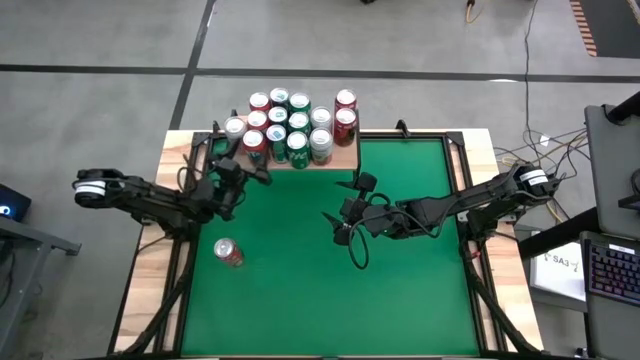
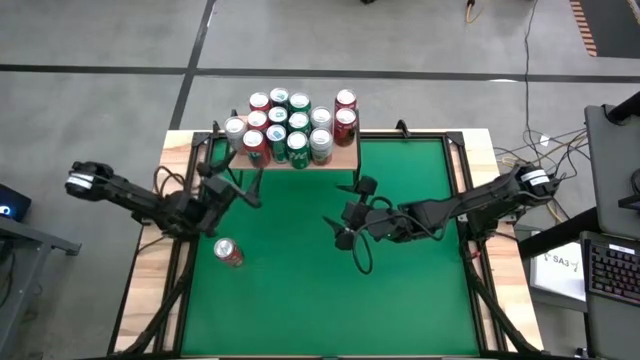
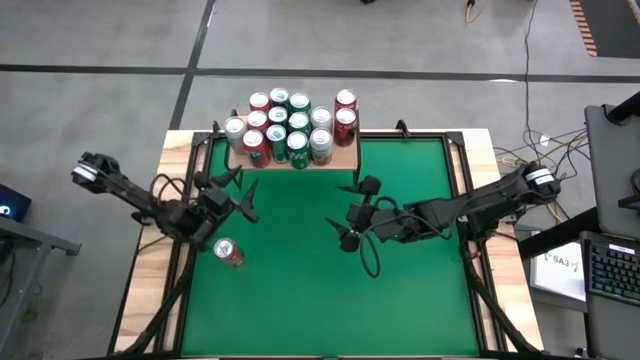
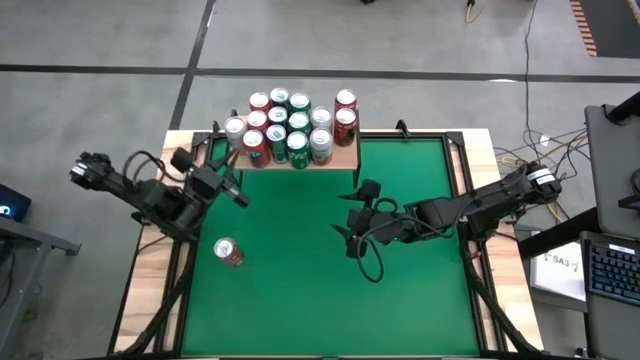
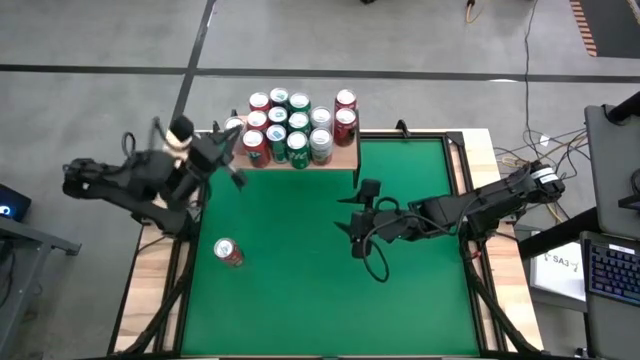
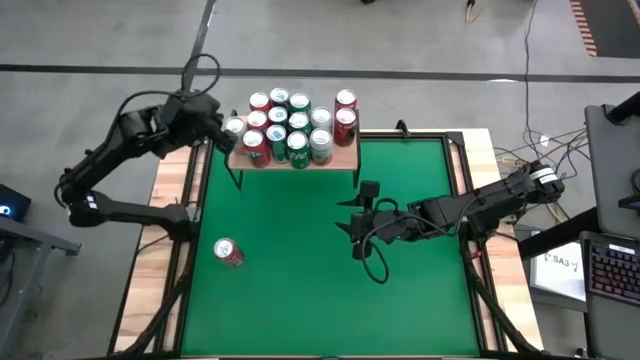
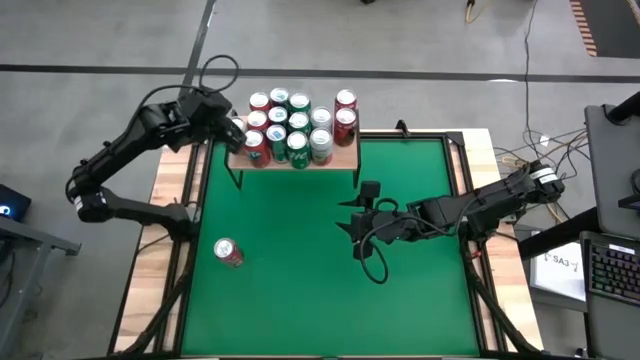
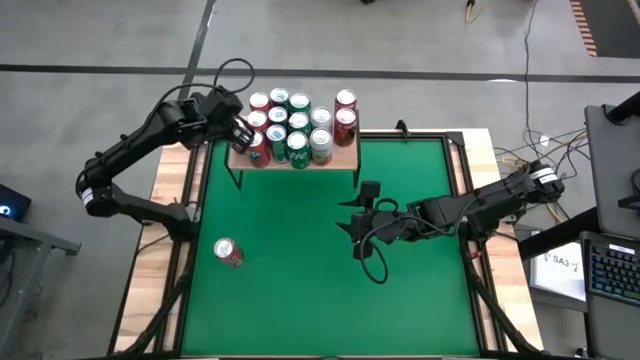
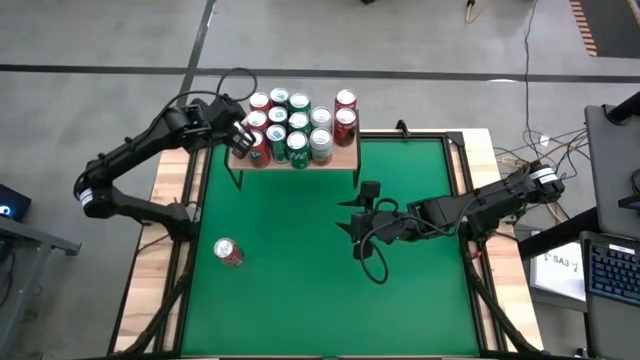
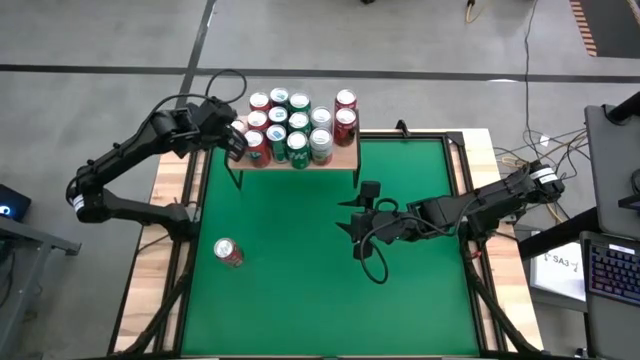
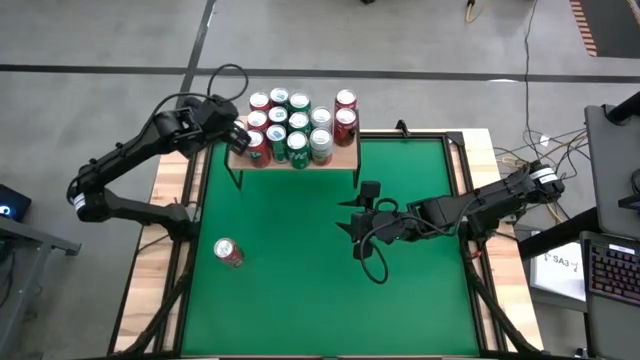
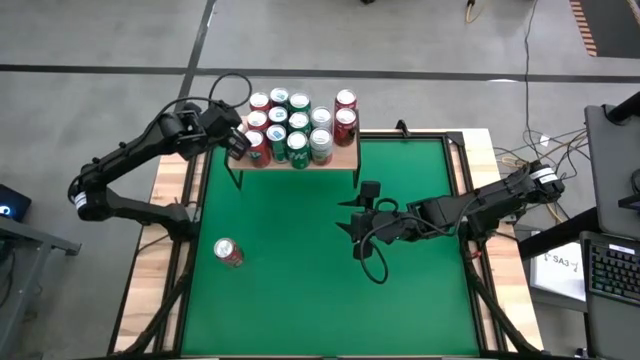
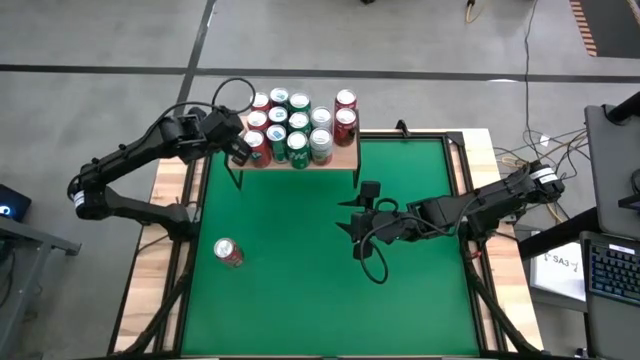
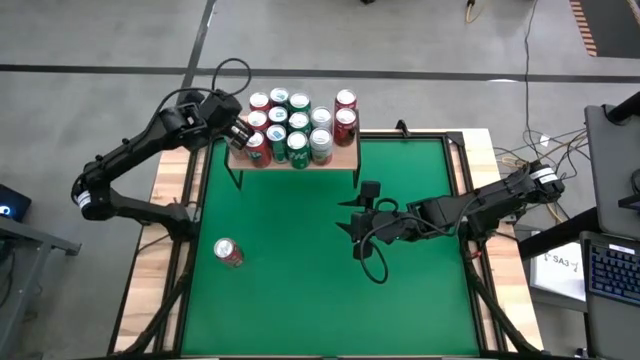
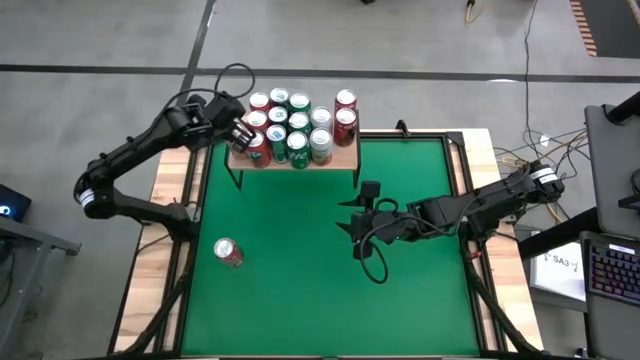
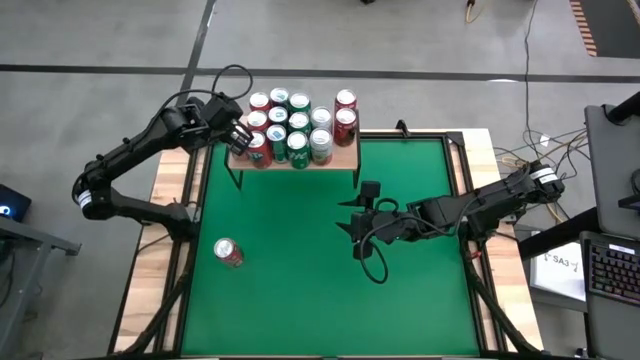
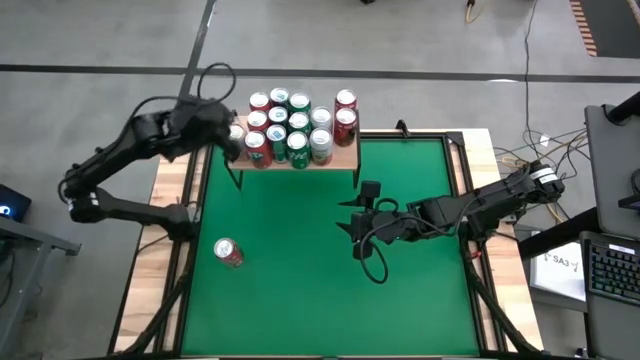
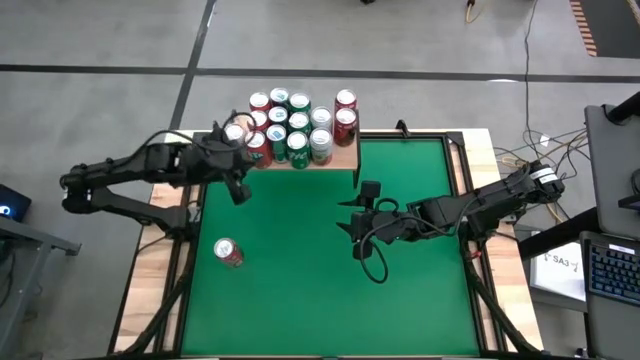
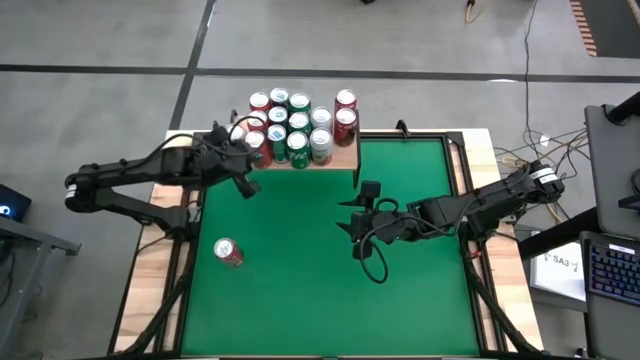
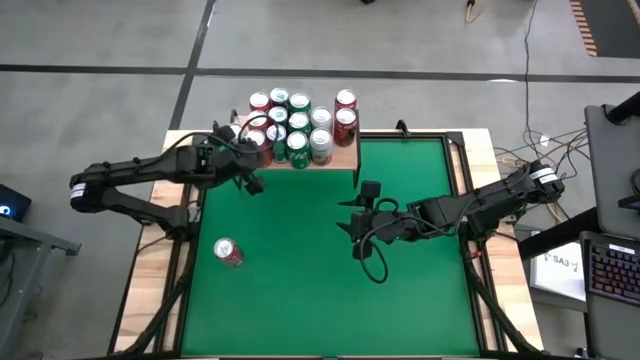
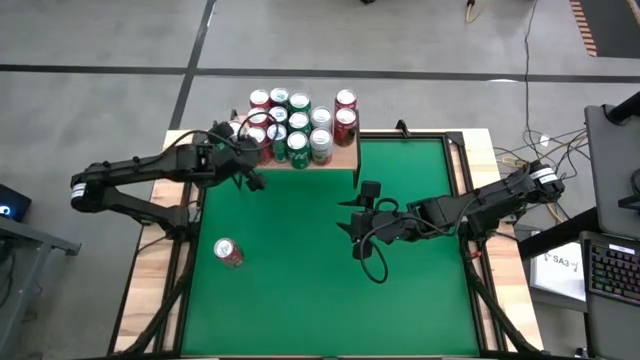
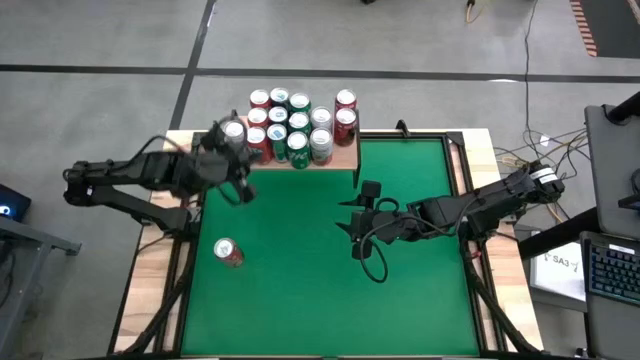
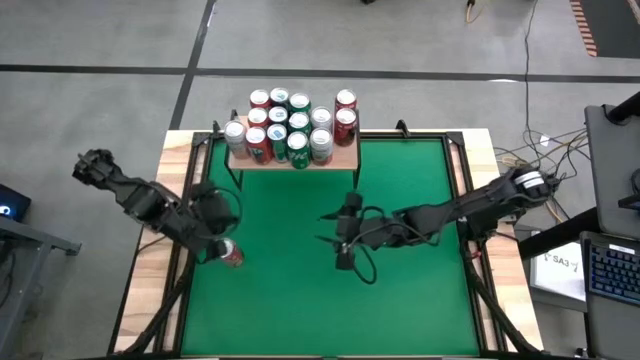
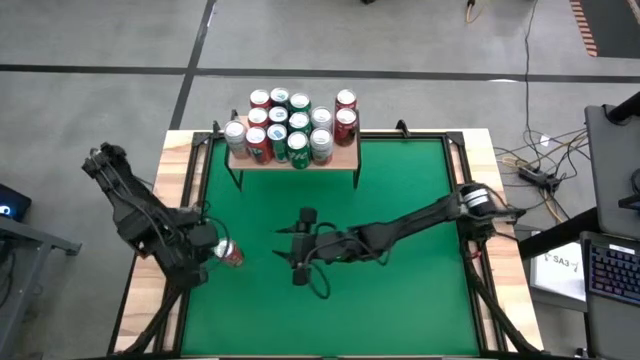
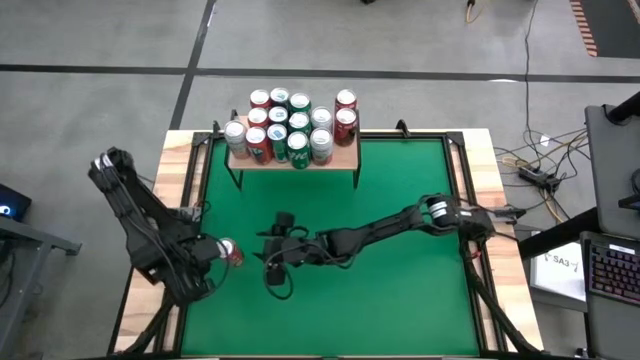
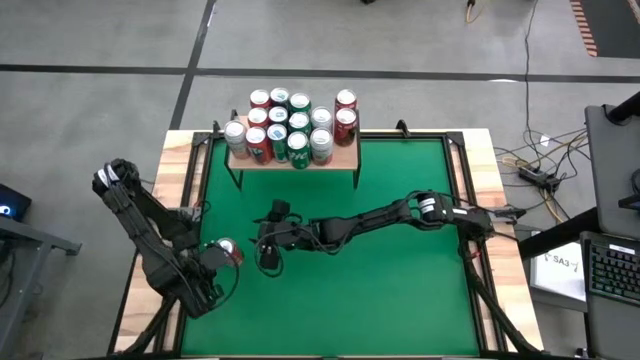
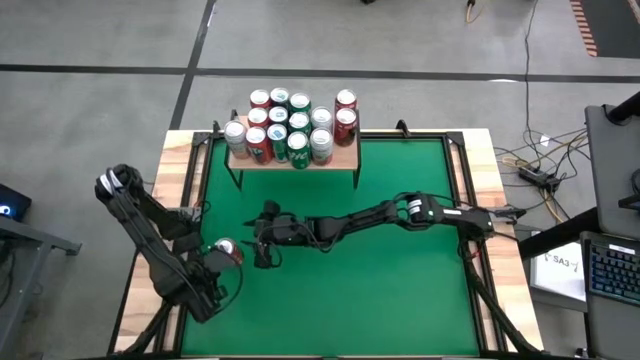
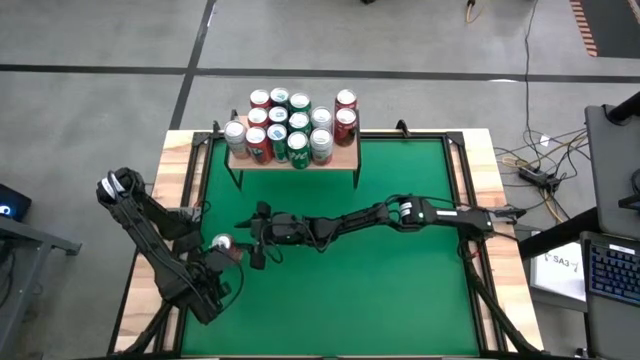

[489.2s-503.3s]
Task: Place canned beverage on shelf
Put the red can on the shelf

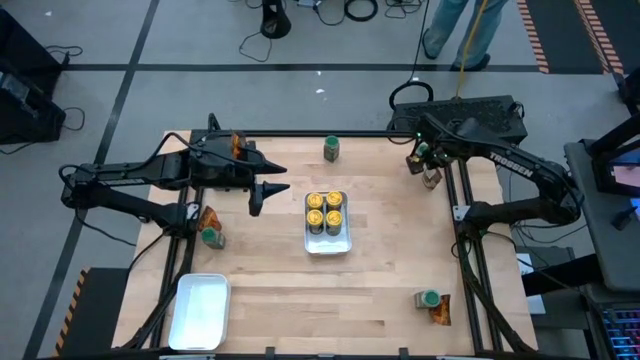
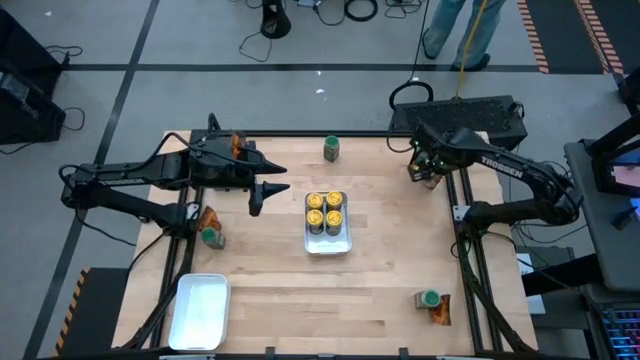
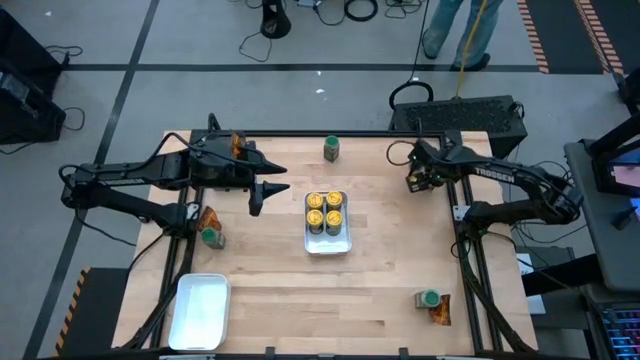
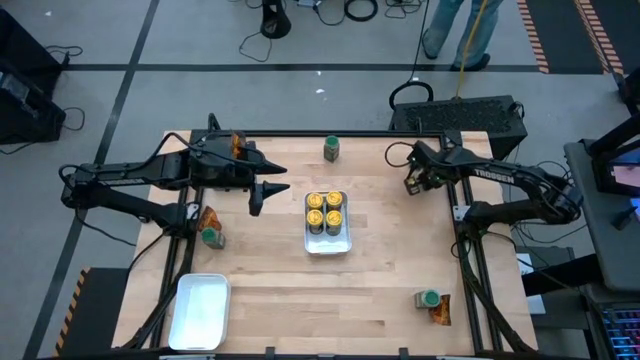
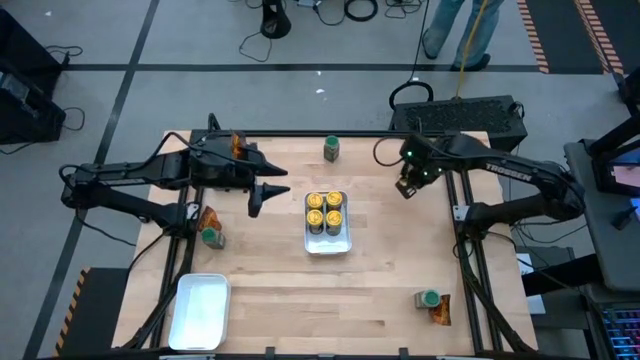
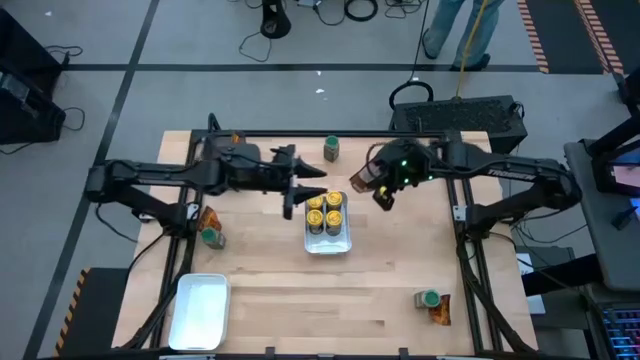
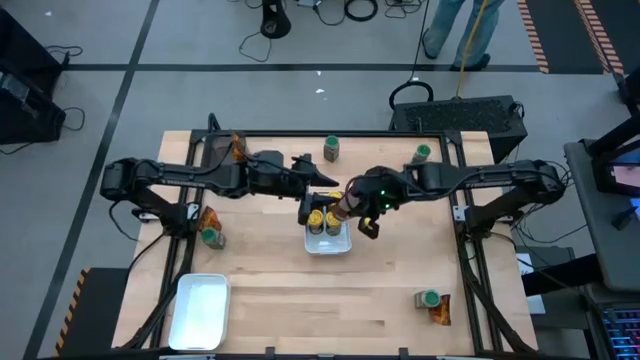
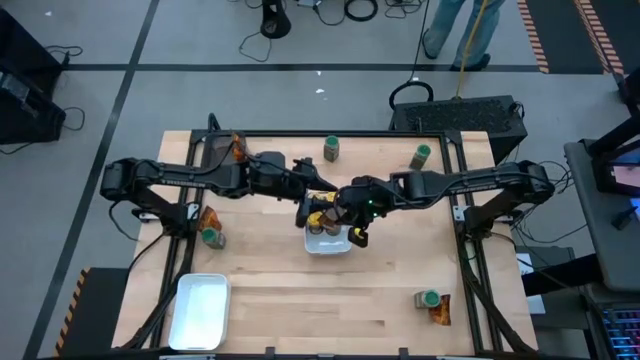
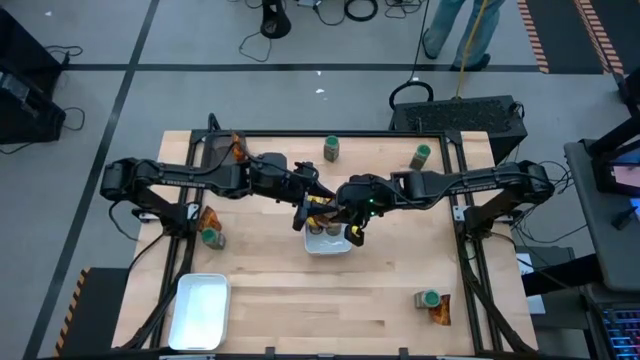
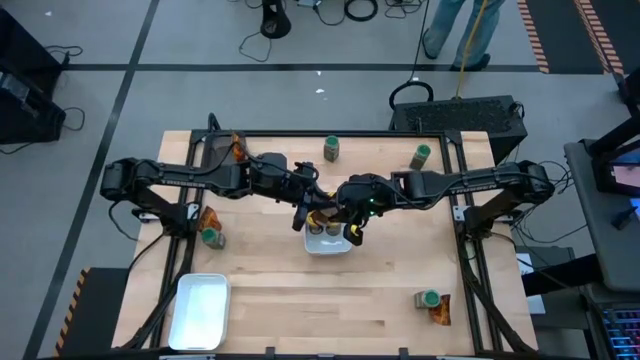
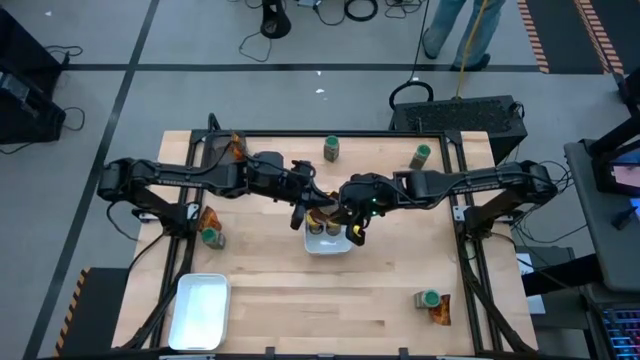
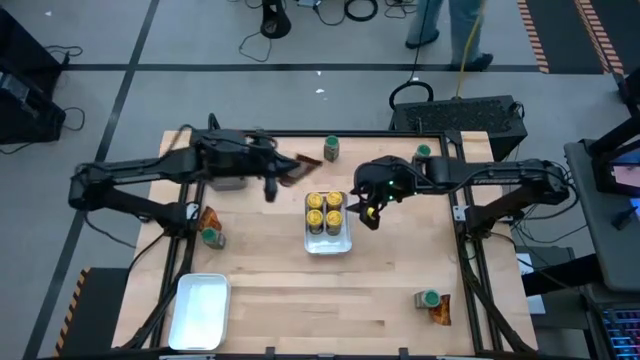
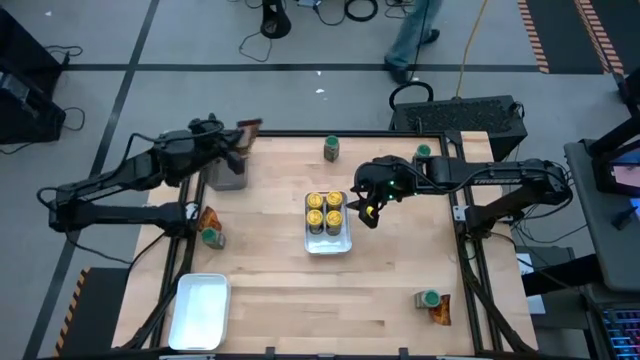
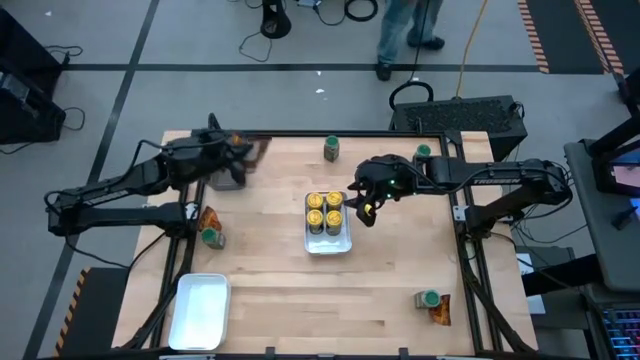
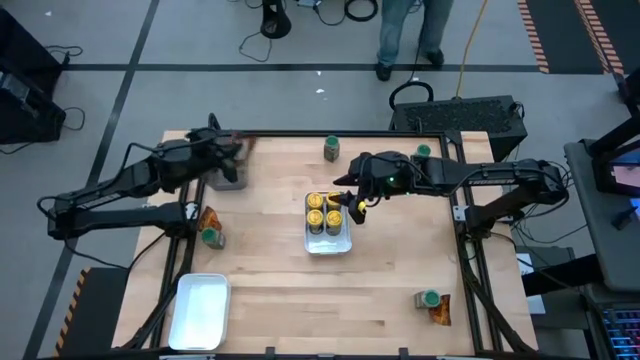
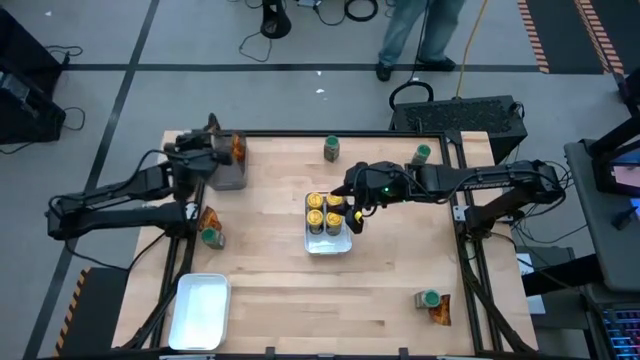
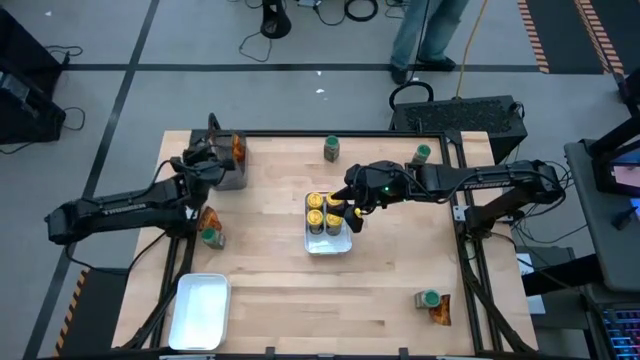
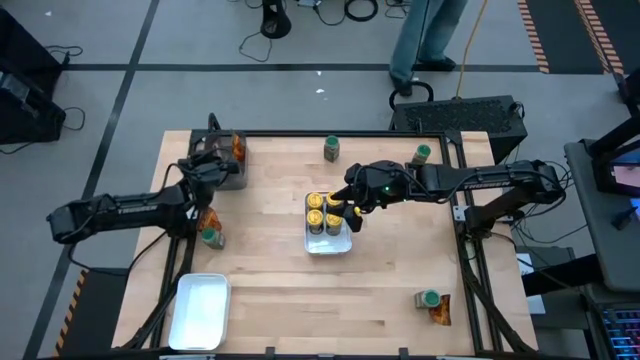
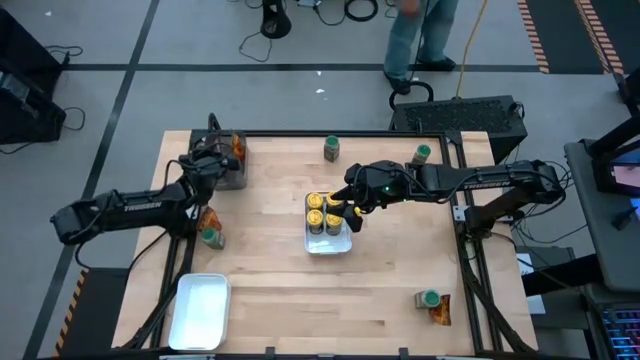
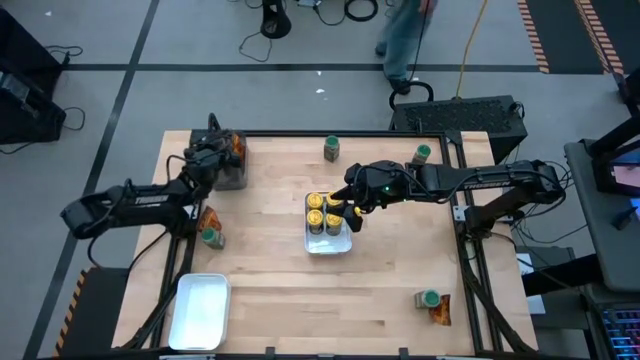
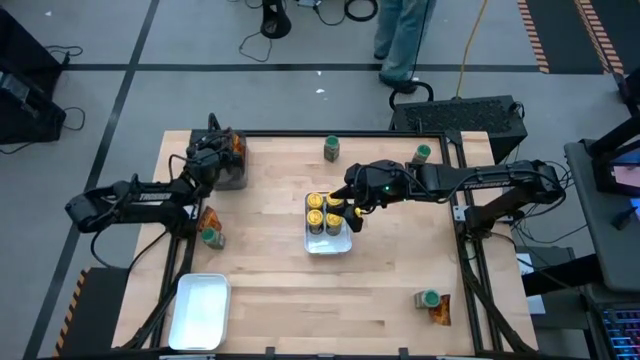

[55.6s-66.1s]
Task: Sort spices by type
Put the top right dark red spice pouch into the black transparent bin
